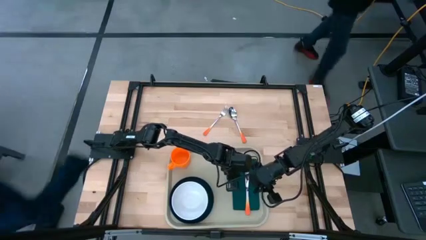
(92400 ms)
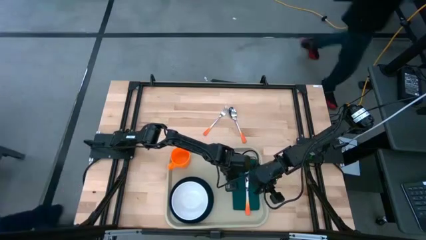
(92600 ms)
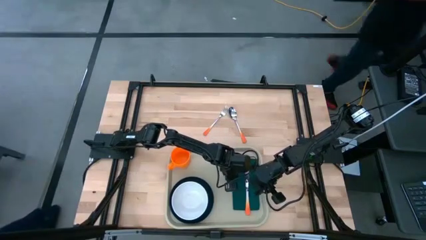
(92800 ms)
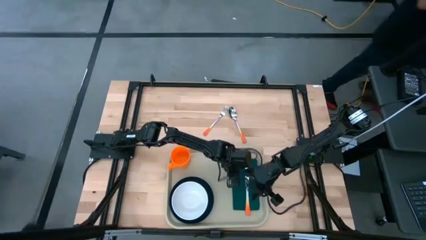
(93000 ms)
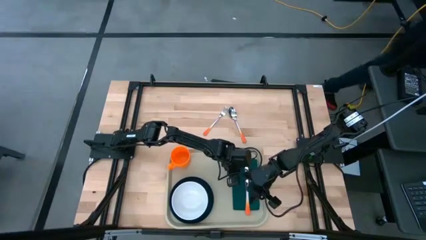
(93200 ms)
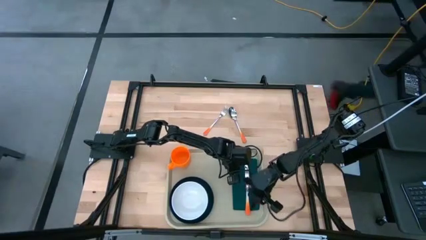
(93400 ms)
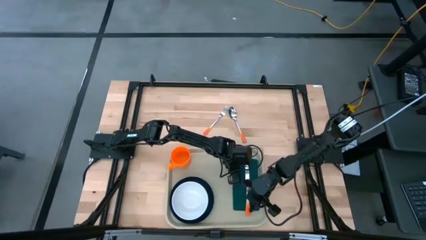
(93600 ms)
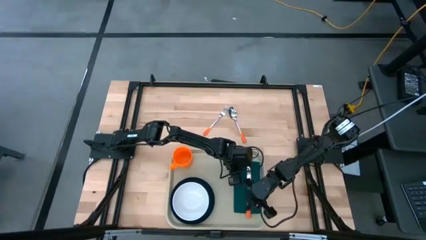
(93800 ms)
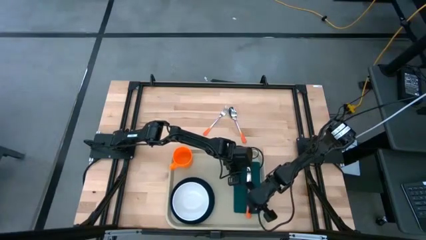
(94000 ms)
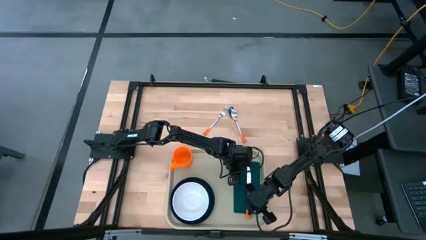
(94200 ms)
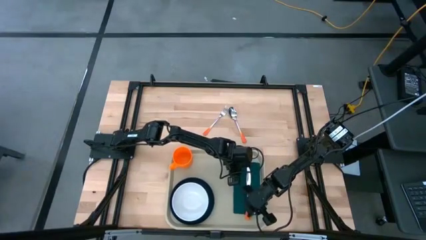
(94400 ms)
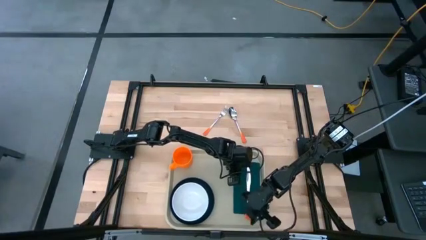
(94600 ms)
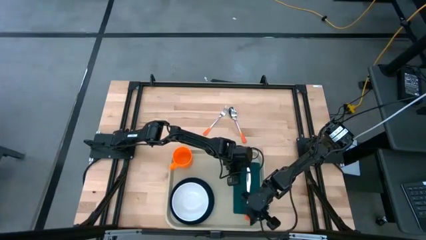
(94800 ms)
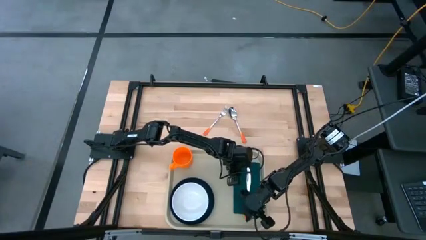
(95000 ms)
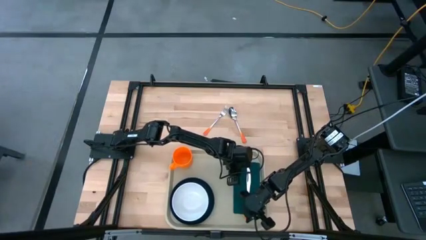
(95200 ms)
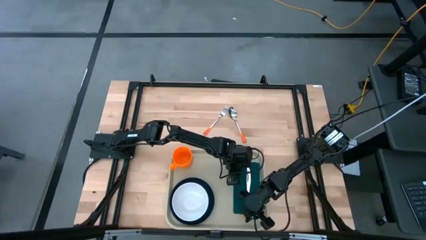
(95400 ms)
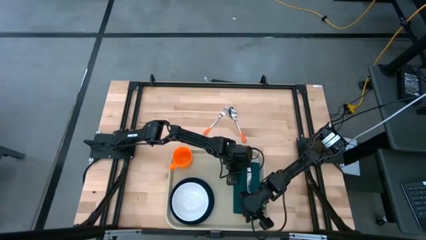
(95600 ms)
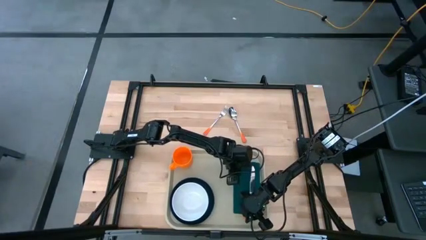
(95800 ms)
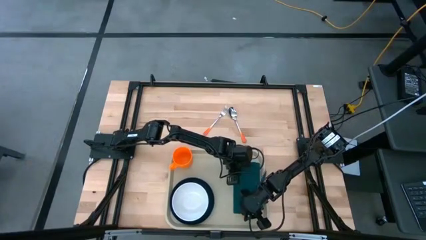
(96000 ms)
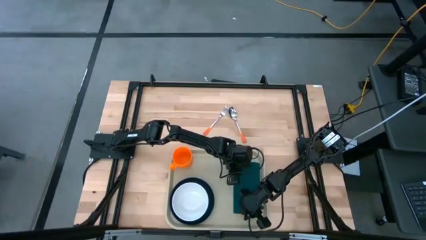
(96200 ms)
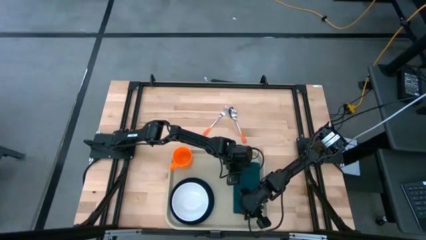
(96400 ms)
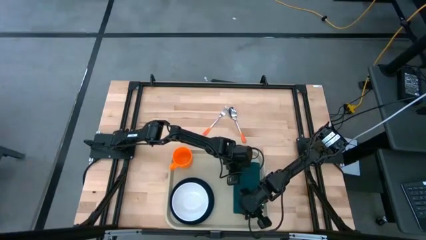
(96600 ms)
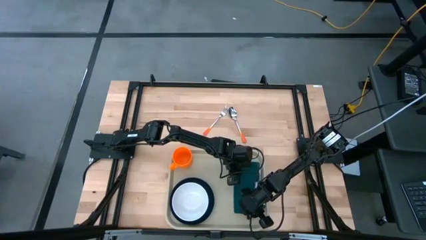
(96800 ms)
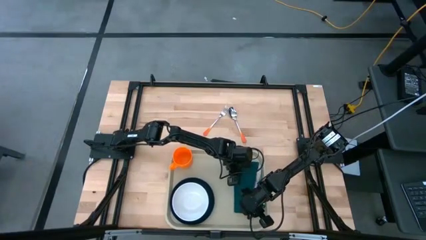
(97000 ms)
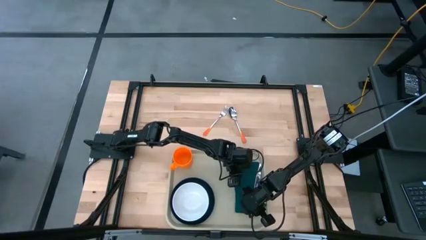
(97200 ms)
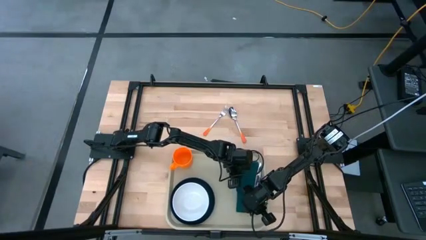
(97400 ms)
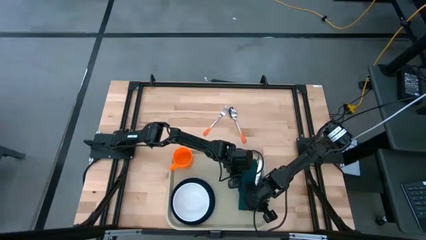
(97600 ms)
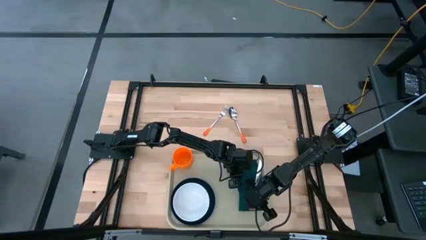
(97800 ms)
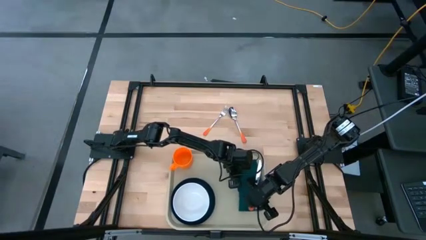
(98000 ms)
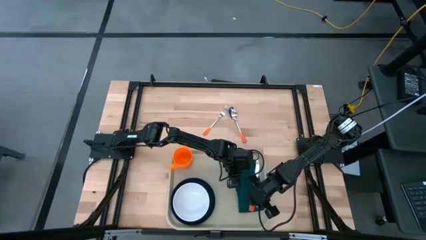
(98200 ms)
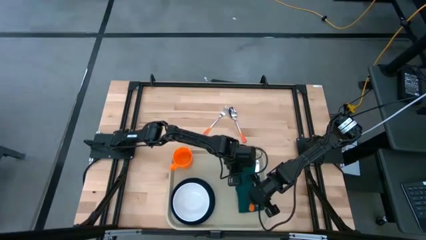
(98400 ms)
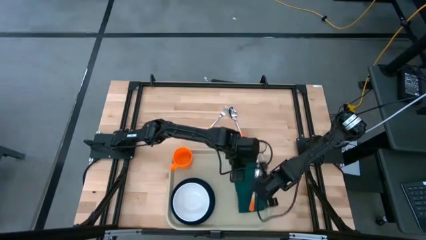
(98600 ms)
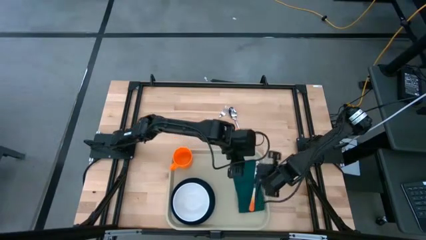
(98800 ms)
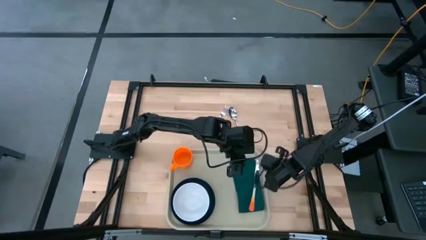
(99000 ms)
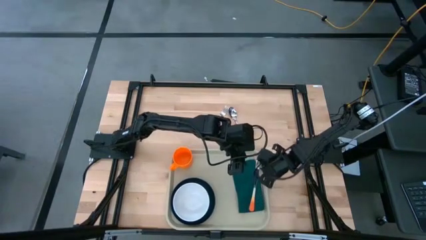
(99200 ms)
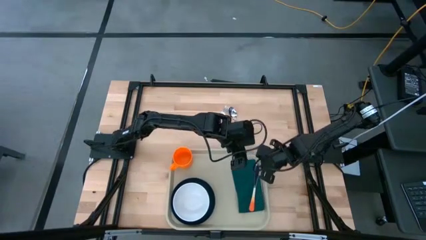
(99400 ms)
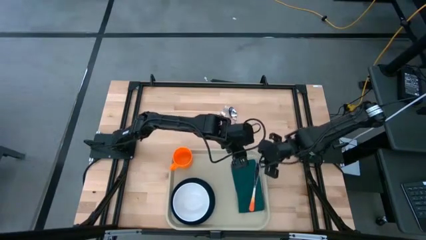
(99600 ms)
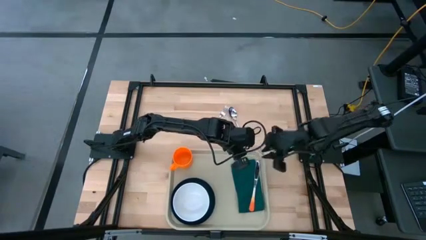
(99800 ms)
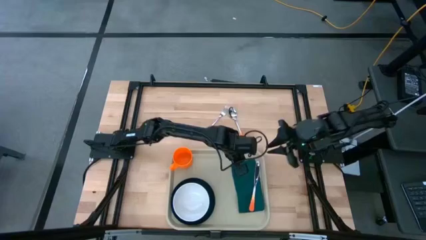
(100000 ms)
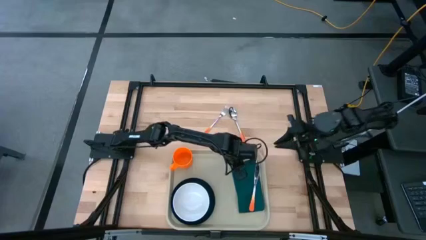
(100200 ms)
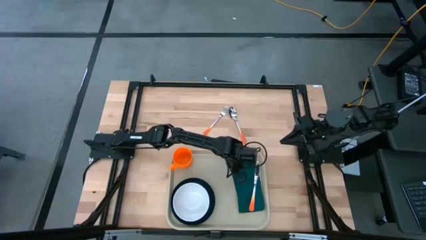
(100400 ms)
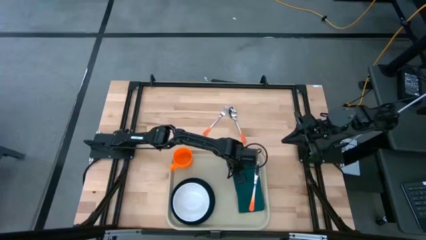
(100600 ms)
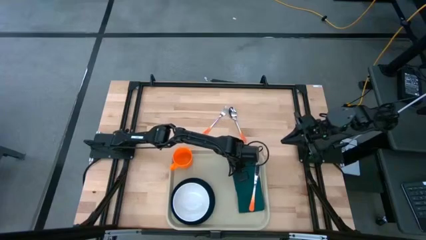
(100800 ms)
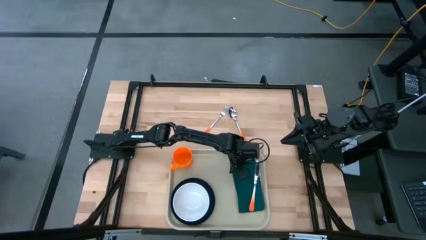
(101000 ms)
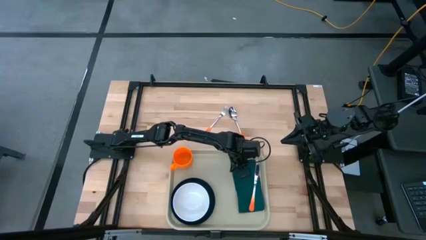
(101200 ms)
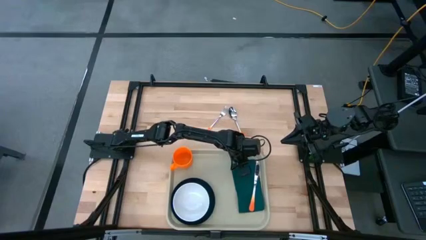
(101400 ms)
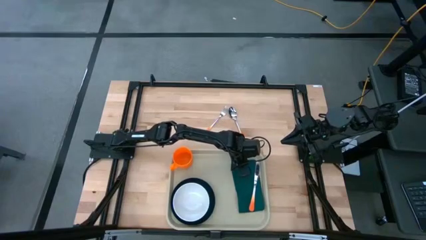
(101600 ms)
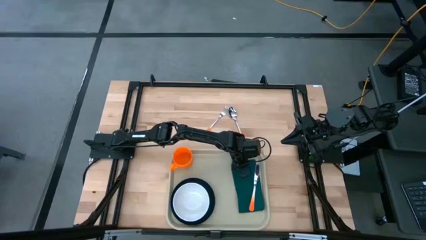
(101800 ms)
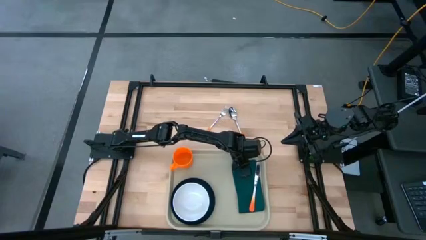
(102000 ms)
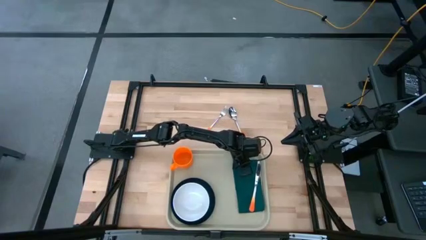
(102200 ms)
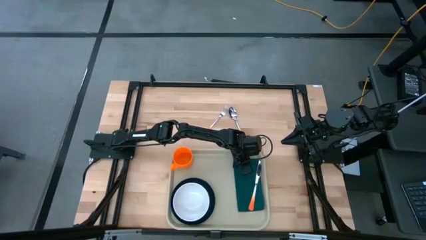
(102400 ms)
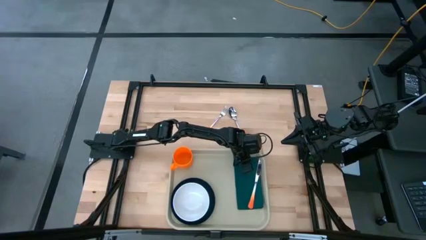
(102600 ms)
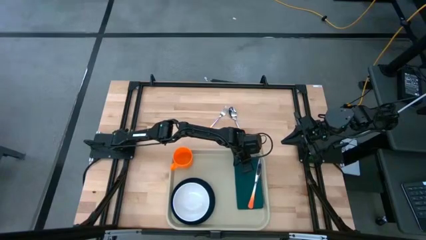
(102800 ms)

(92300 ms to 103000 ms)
Task: Set up tray
Adjust the green napkin on the brown serving tray
